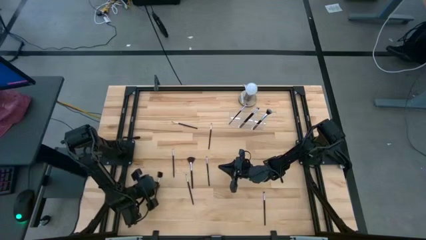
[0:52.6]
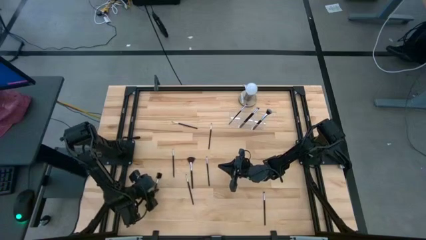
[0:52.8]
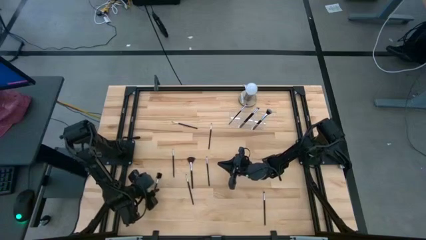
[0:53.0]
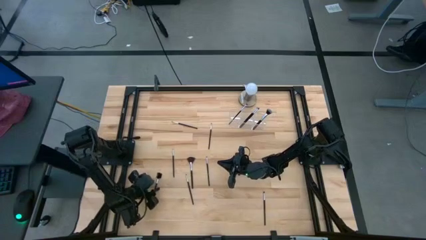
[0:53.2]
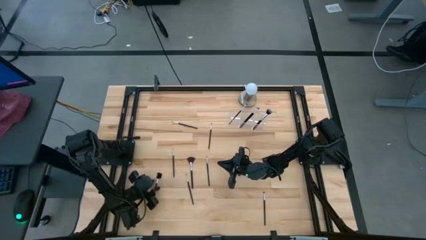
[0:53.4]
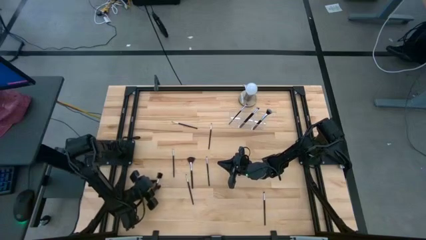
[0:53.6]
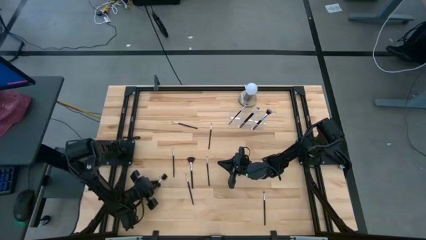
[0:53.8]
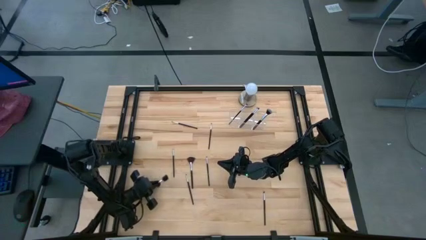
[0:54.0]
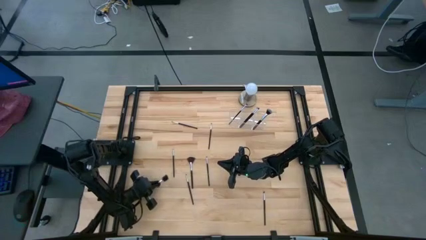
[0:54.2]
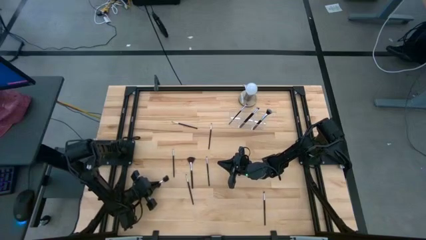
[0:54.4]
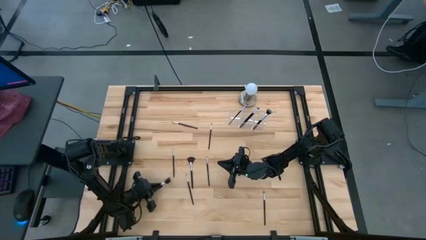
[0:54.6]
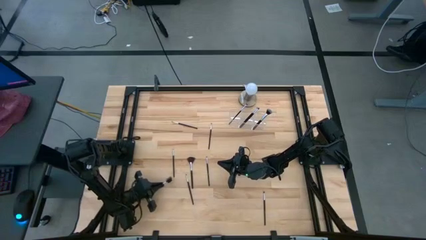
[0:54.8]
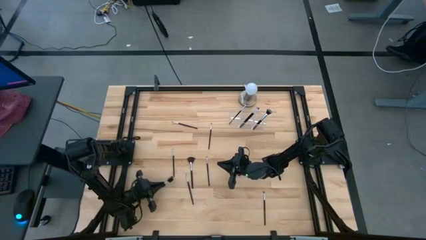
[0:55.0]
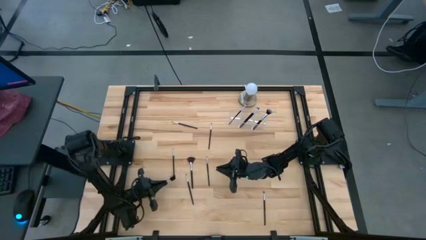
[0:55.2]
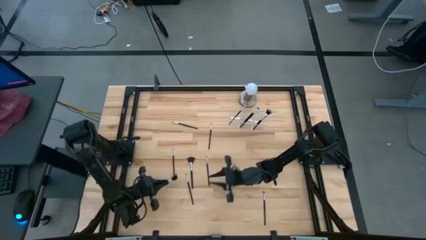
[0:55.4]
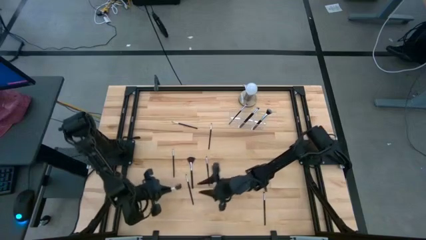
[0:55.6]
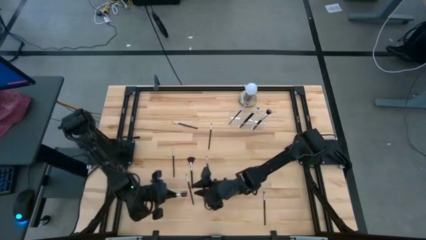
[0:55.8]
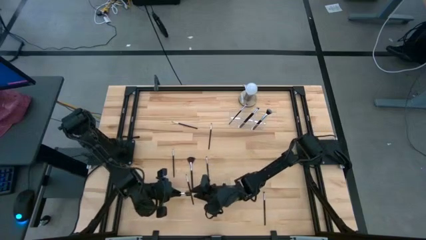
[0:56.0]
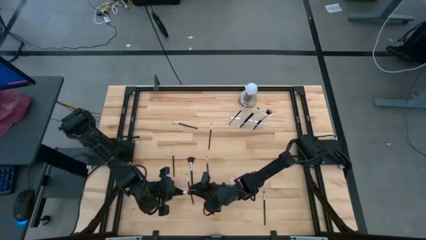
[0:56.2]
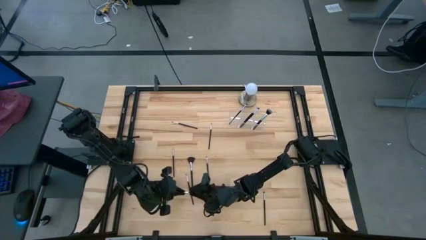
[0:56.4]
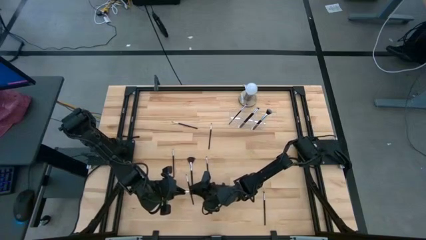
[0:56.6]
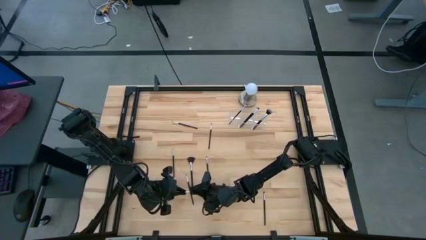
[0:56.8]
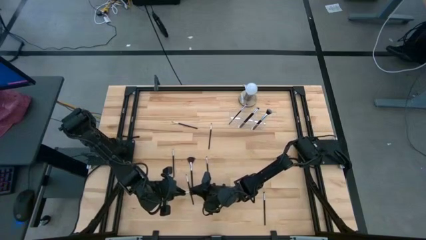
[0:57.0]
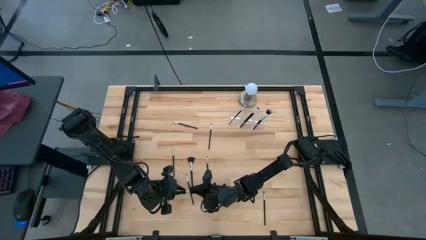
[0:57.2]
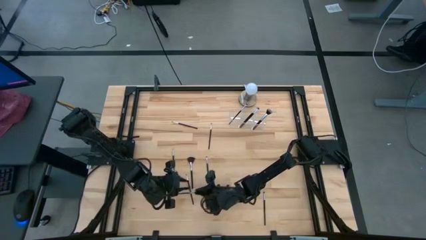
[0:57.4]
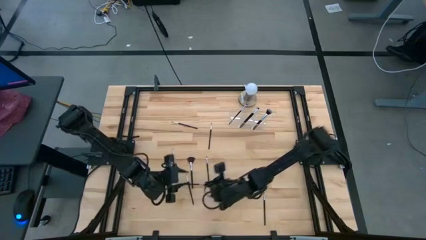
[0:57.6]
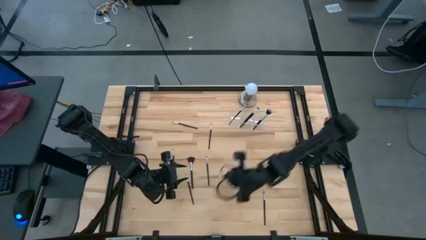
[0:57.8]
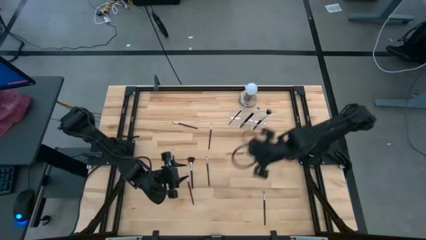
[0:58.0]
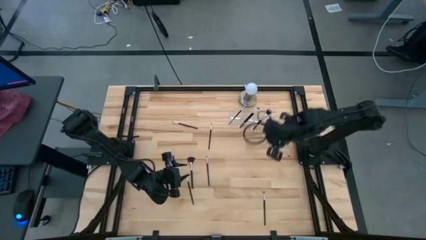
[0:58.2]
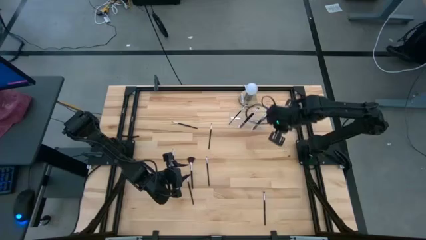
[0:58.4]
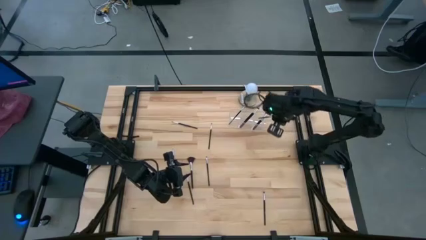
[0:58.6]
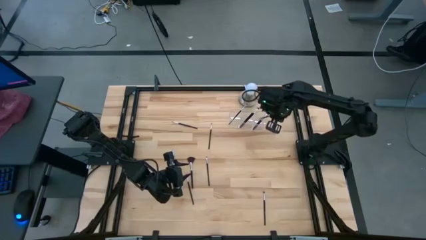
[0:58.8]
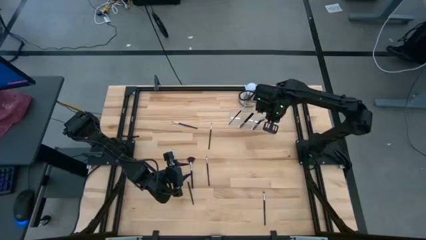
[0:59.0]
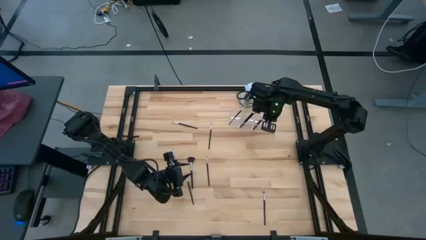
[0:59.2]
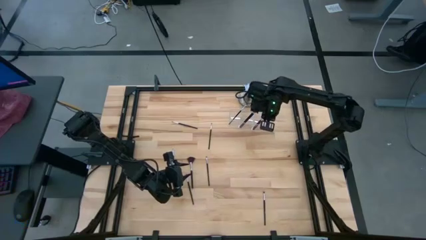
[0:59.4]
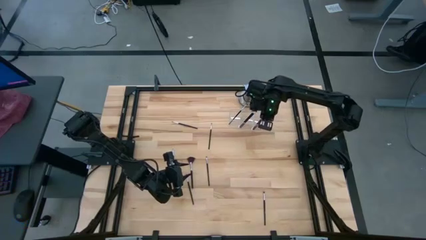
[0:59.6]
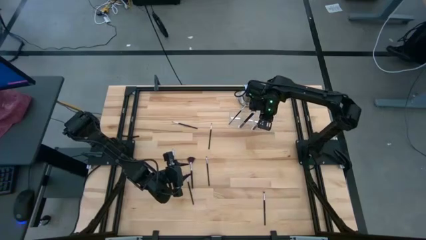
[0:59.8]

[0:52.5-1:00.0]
Task: Put items in baskets/containers
Put the eye groomer brush into the transparent organizer

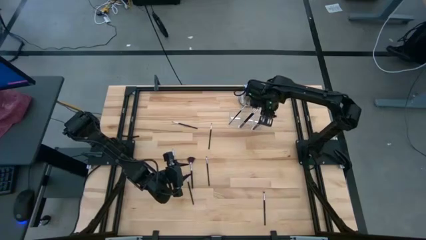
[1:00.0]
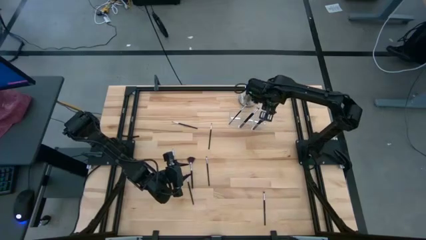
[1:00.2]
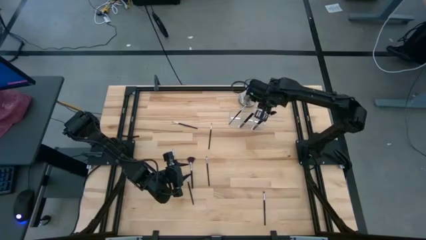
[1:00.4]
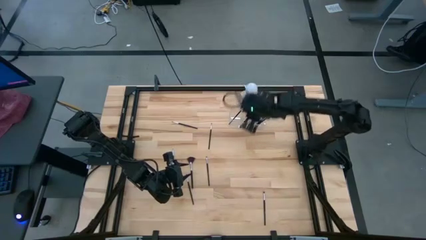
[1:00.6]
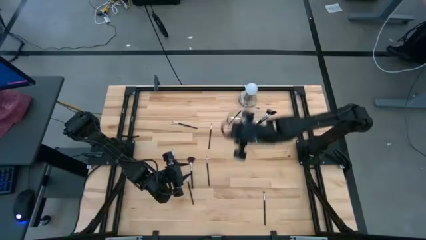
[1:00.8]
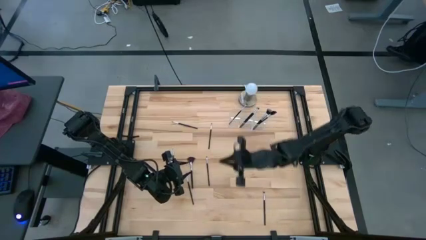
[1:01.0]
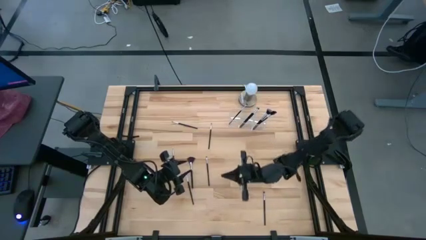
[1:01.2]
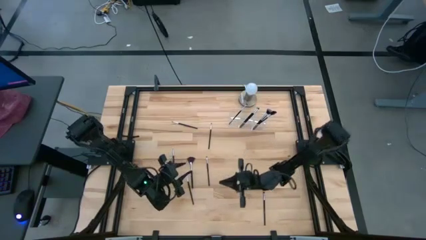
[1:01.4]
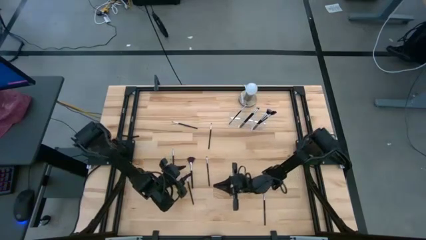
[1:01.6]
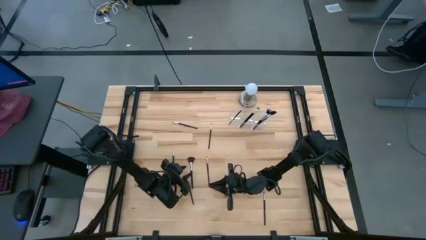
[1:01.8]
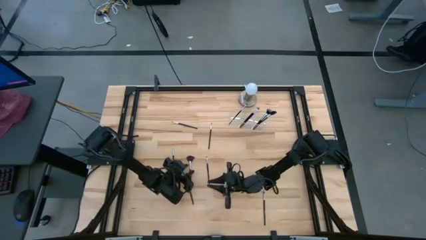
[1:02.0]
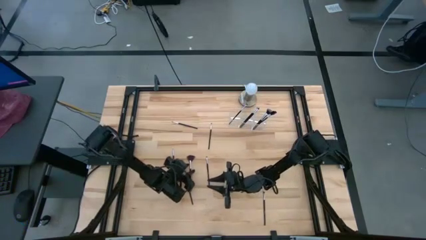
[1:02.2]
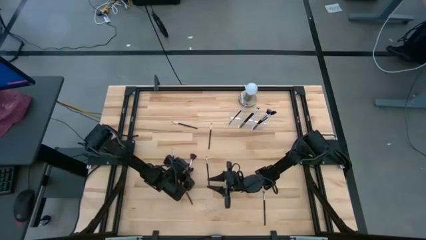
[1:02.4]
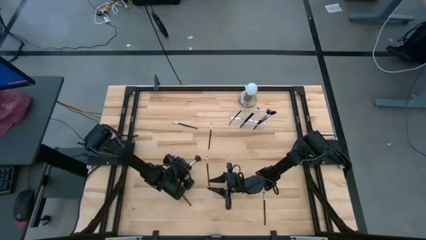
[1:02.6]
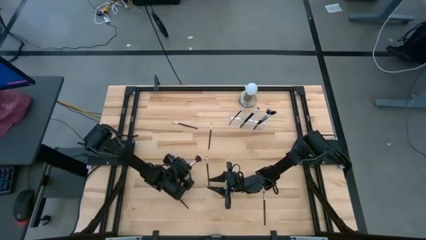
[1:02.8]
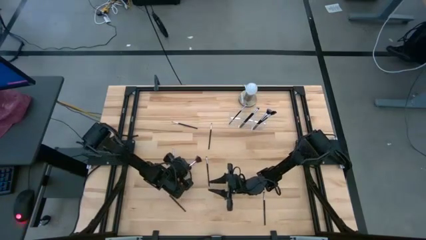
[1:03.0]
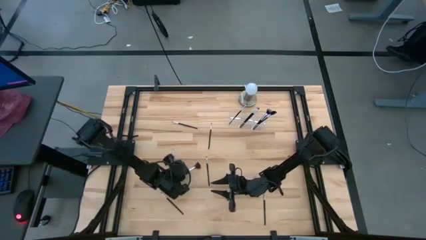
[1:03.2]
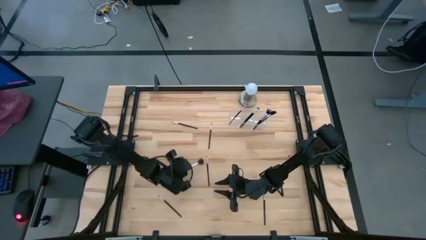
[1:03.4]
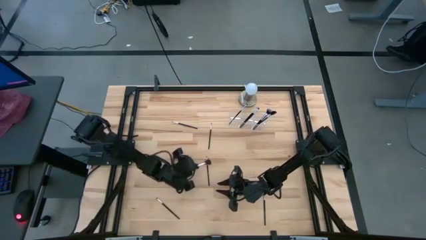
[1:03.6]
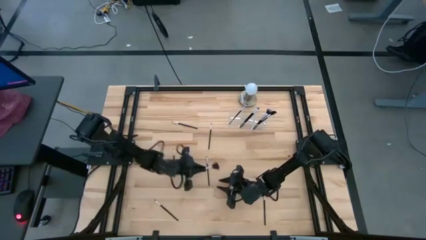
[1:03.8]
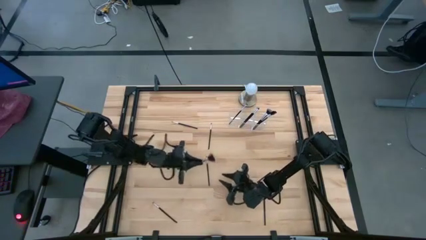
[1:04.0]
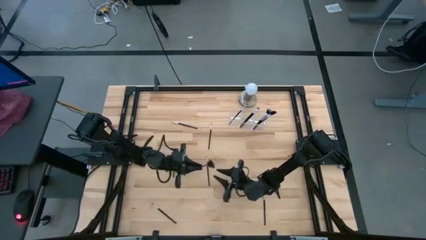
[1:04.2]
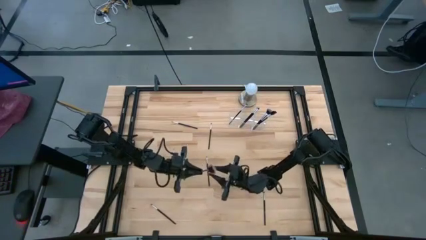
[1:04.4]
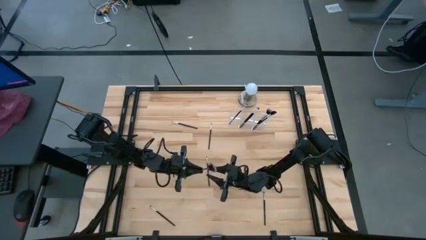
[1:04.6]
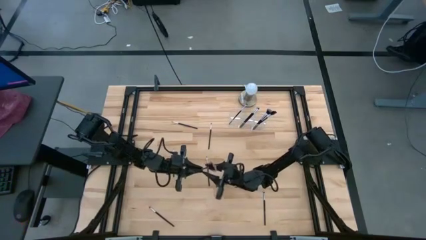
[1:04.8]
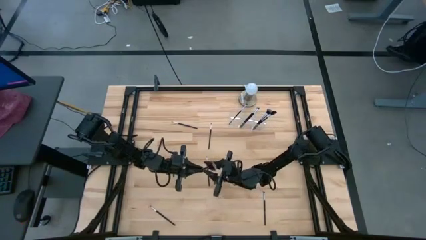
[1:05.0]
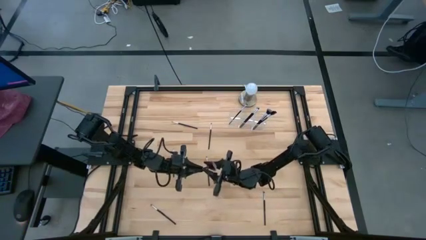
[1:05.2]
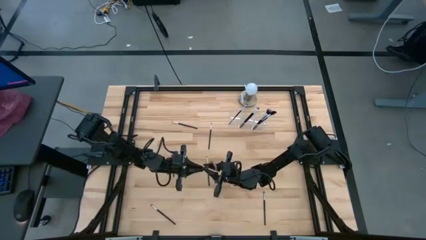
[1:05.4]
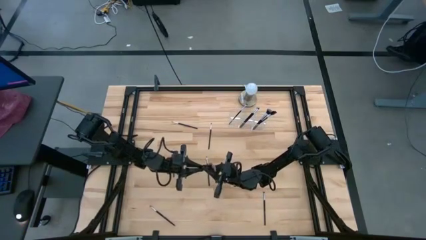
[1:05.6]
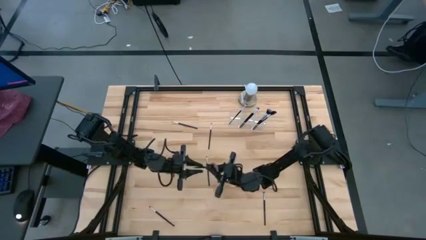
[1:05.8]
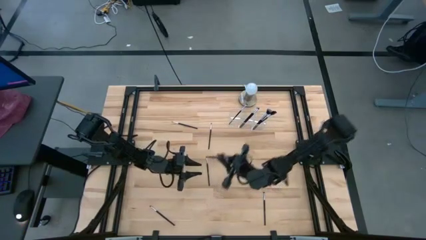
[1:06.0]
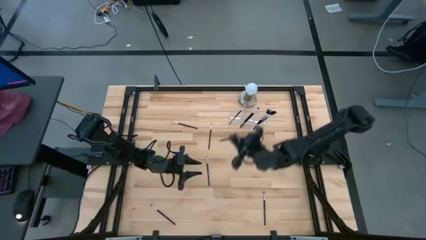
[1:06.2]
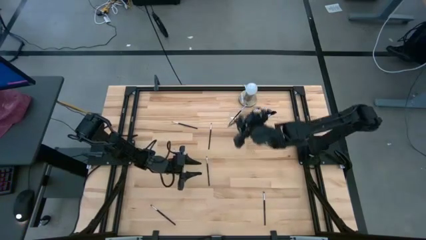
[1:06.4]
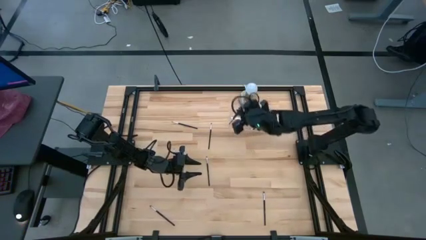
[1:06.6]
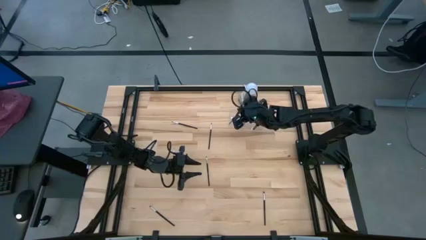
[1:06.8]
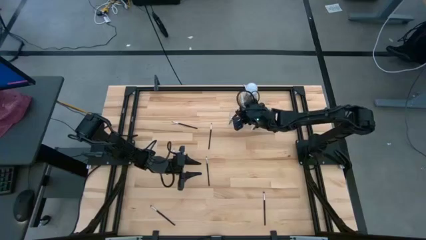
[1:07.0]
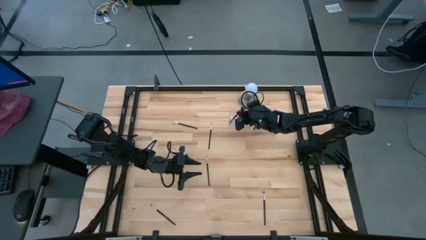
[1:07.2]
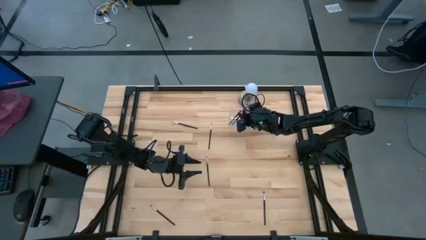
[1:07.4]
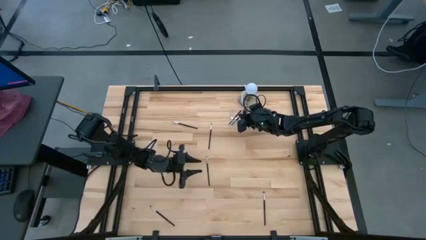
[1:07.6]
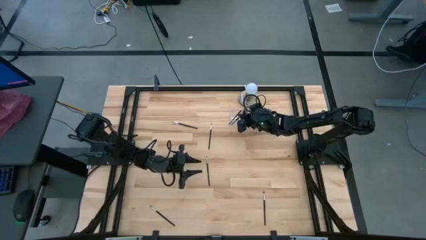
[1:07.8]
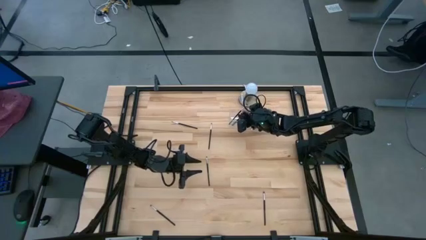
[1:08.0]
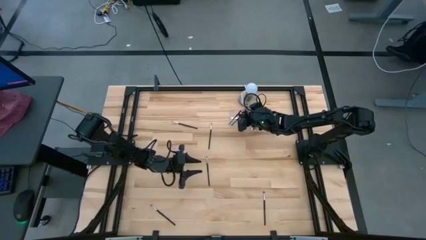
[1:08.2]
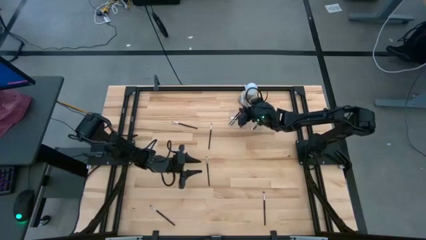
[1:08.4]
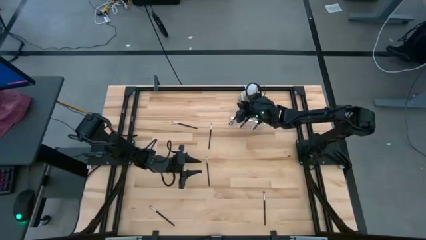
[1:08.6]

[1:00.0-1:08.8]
Put the highlighter brush into the transparent organizer

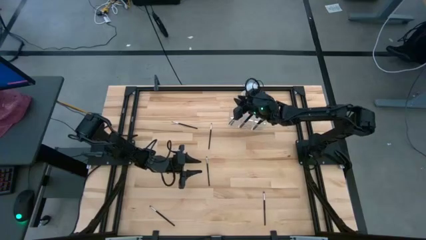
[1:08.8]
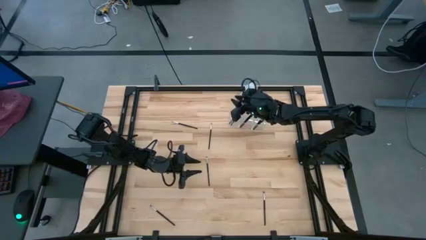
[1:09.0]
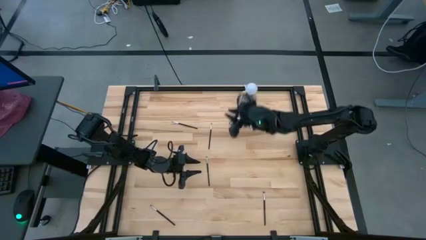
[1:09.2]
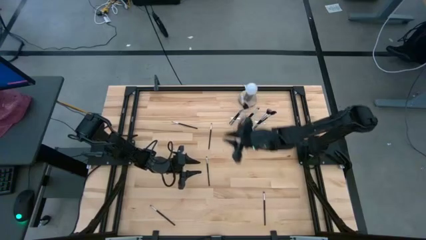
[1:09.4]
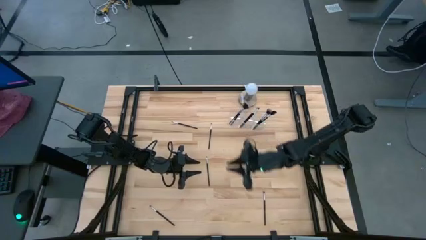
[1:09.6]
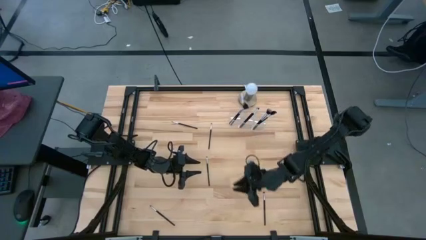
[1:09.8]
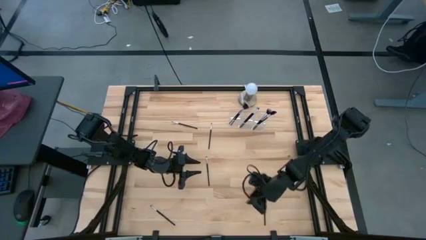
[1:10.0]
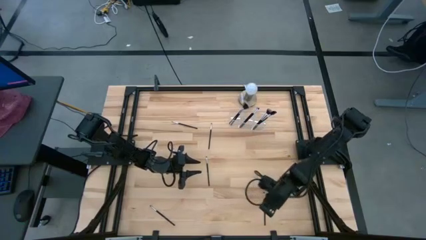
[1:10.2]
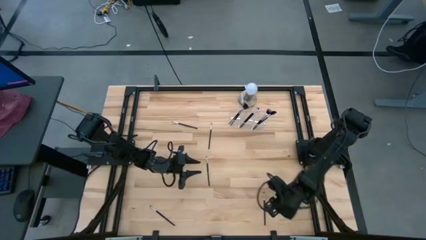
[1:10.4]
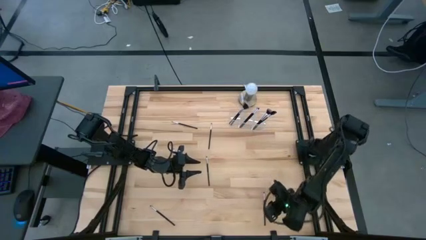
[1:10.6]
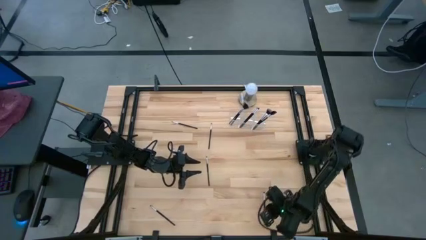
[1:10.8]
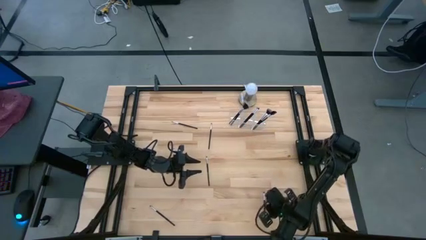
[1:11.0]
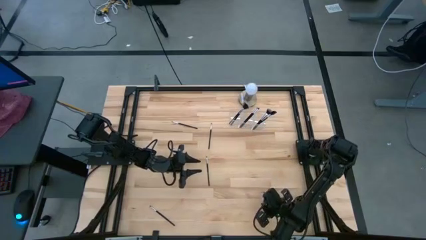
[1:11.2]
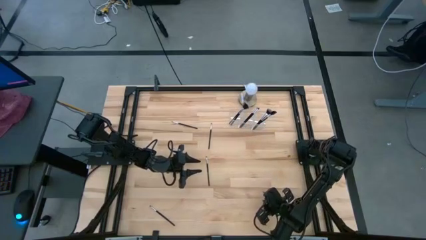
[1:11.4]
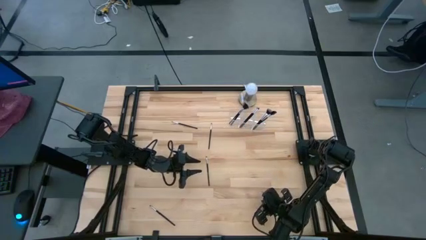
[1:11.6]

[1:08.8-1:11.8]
Put the eyeshadow brush into the transparent organizer
